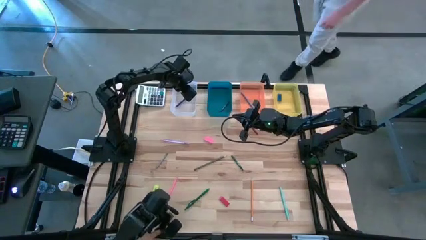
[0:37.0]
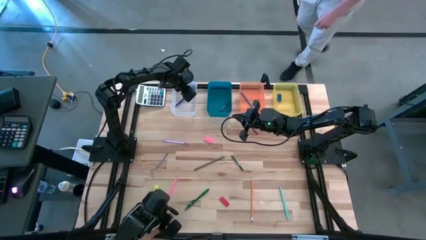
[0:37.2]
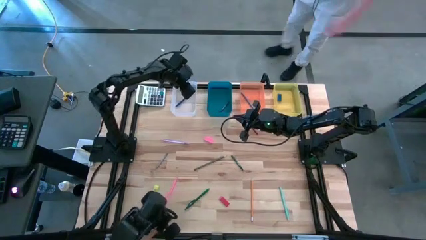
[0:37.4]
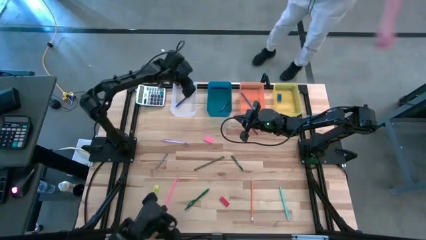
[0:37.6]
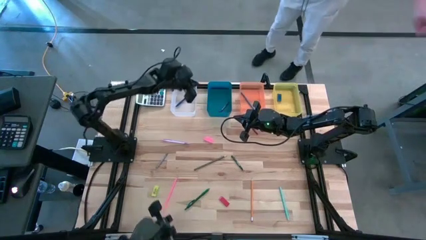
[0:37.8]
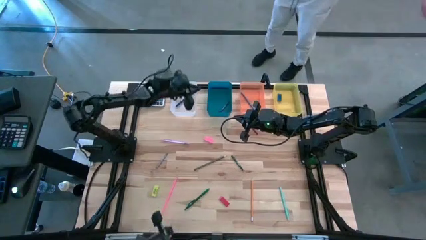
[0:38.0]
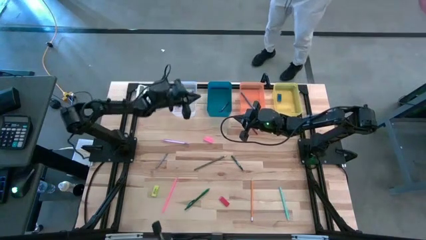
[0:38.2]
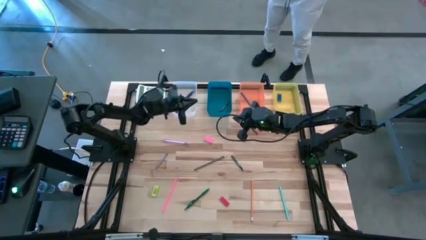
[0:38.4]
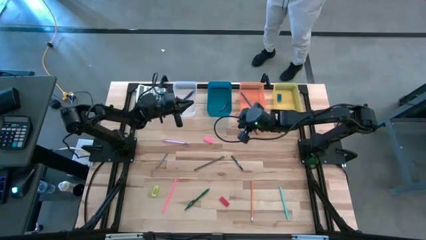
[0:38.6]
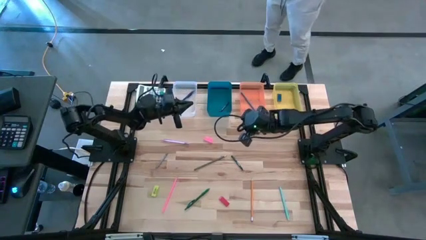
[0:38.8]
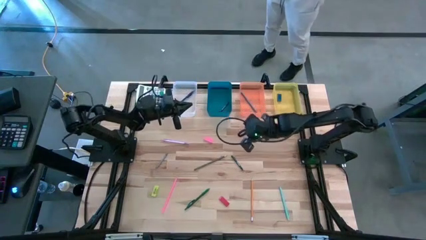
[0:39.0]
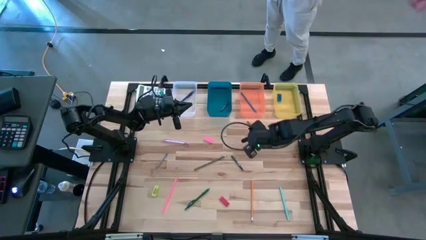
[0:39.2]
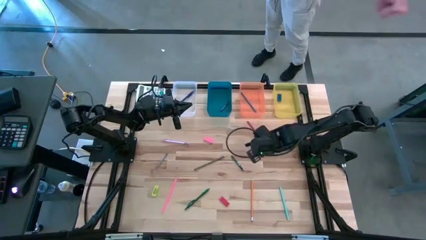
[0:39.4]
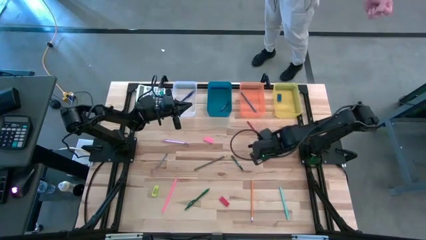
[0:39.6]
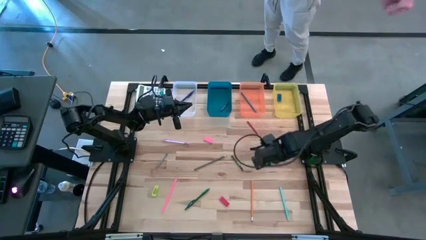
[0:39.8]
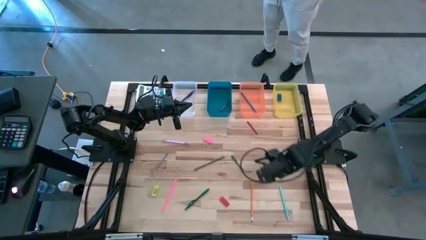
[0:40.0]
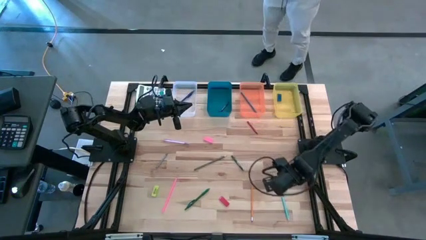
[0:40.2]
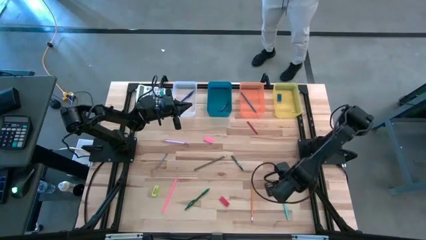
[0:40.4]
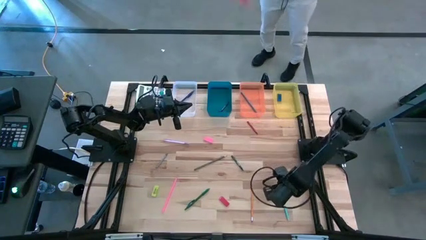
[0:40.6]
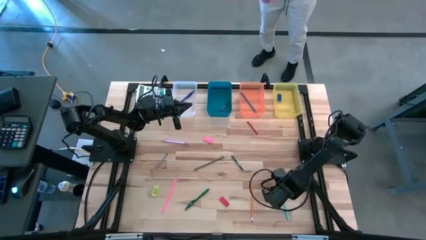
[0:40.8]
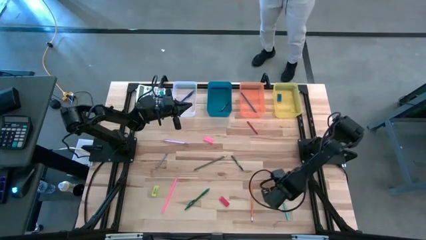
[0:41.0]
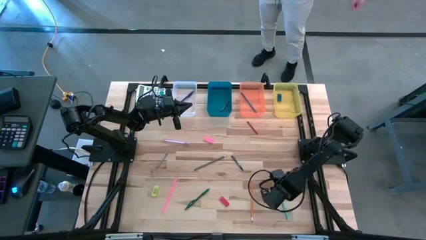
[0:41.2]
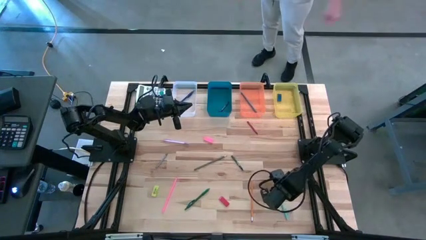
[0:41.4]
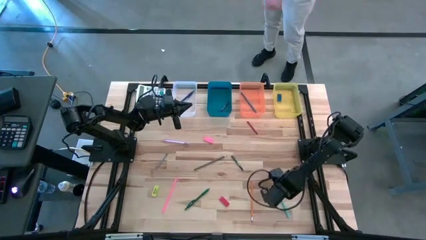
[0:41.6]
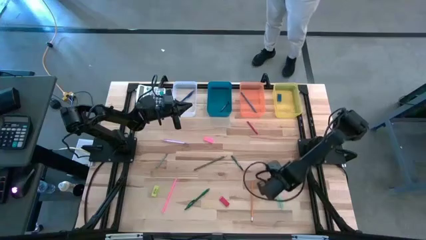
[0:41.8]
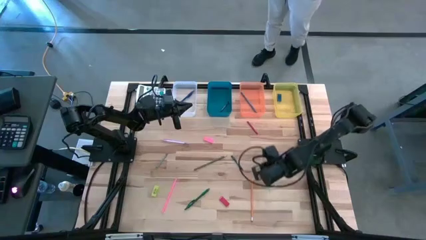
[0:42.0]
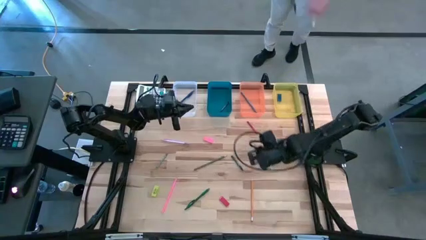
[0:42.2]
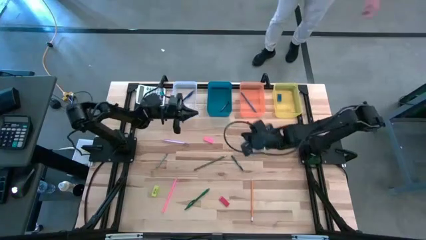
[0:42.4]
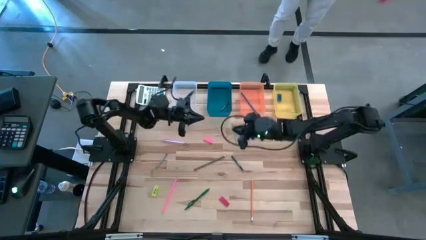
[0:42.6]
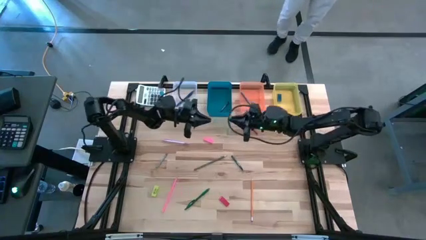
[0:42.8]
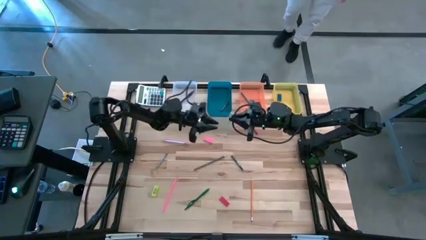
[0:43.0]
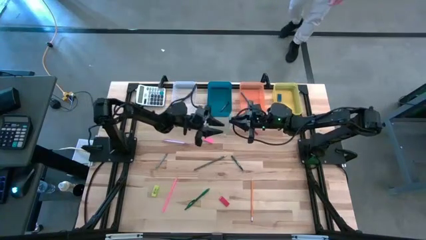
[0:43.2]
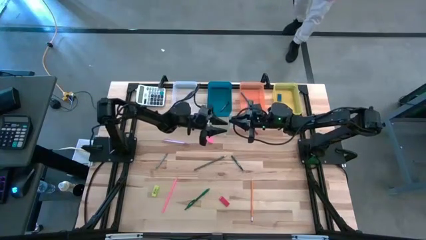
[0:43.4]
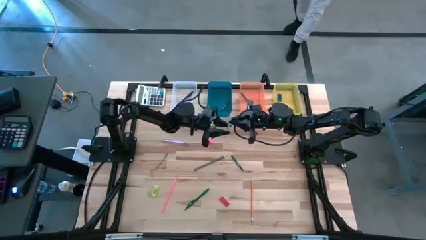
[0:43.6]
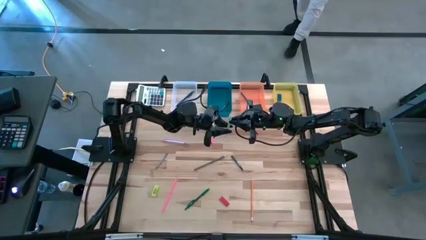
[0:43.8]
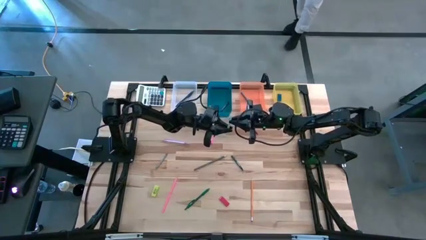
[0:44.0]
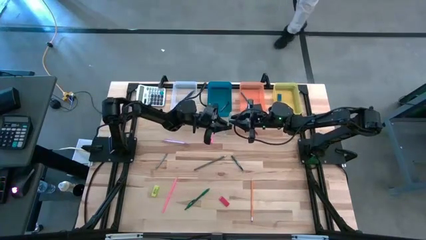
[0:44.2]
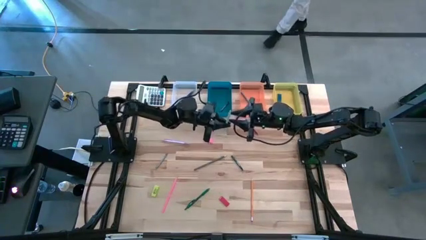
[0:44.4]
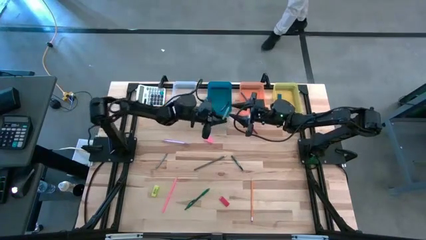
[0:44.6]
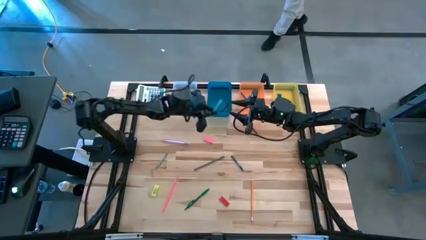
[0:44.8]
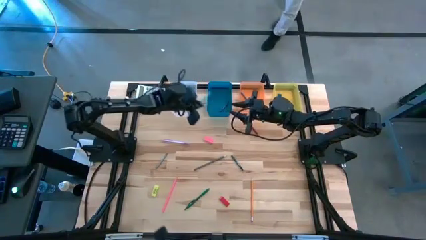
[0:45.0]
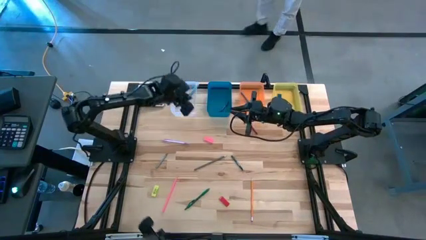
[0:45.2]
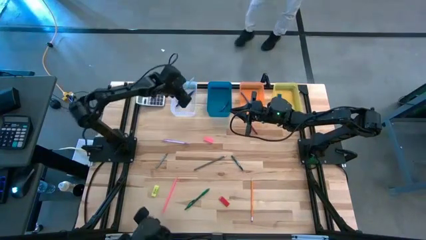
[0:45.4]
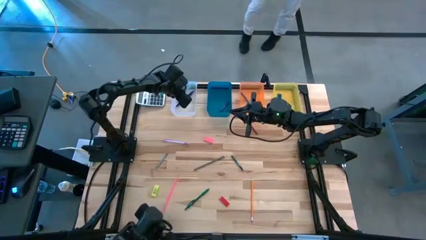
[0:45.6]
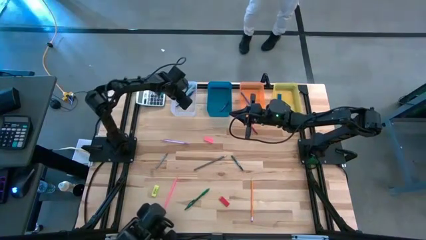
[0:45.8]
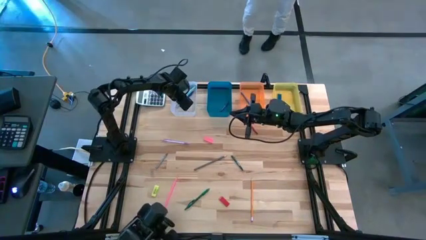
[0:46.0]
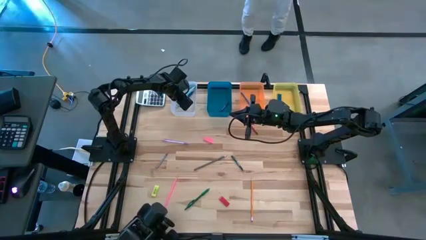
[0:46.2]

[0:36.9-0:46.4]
Task: Sort crayons/erasers/pens/pencils in bins
Put the light blue pen into the transparent bin

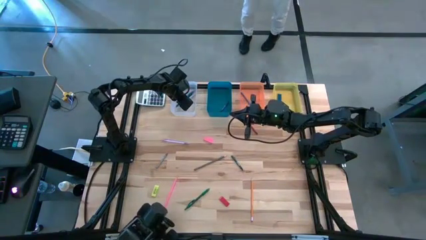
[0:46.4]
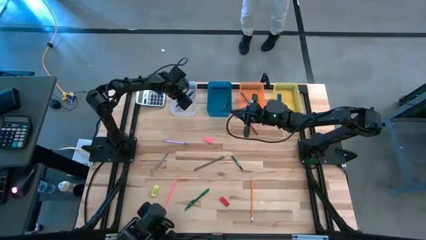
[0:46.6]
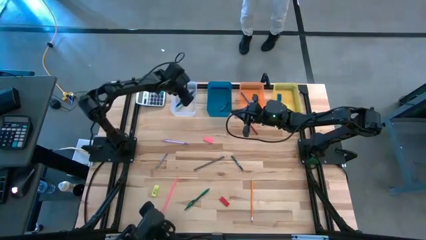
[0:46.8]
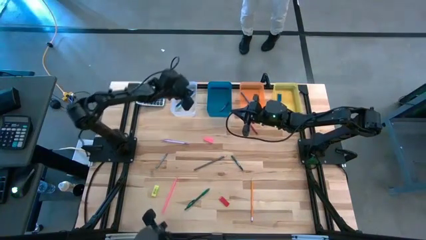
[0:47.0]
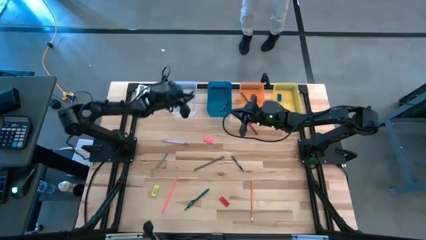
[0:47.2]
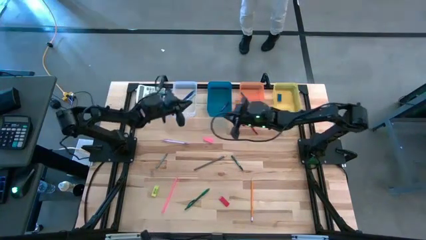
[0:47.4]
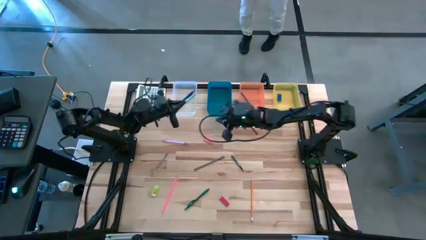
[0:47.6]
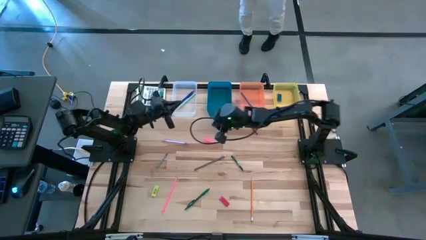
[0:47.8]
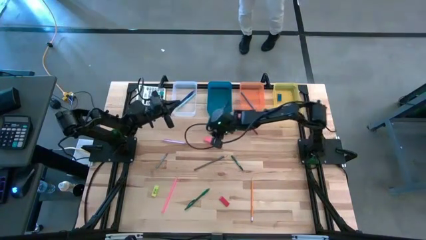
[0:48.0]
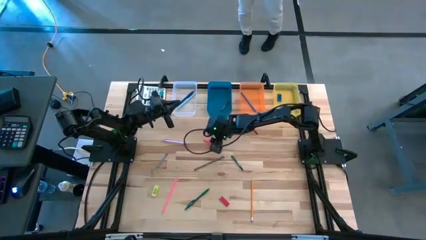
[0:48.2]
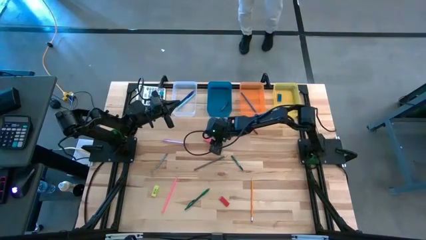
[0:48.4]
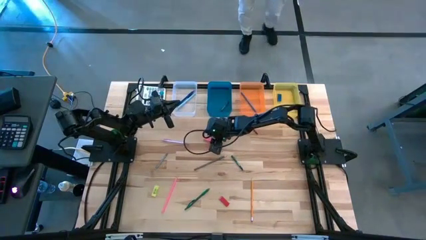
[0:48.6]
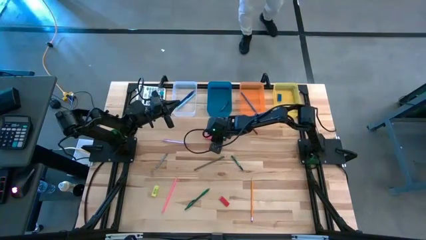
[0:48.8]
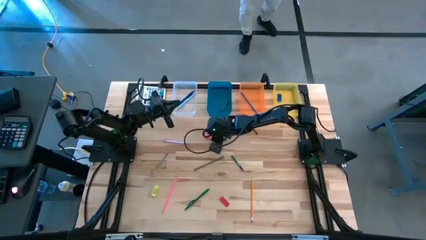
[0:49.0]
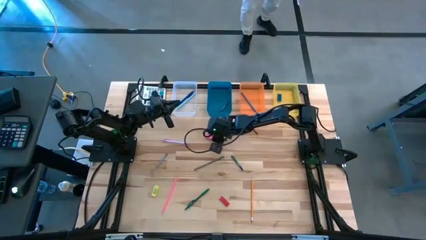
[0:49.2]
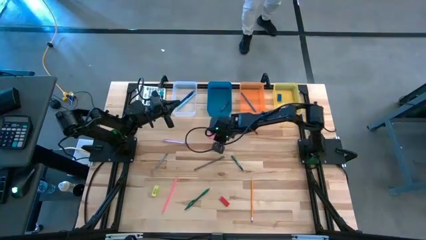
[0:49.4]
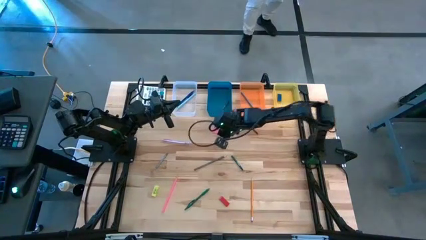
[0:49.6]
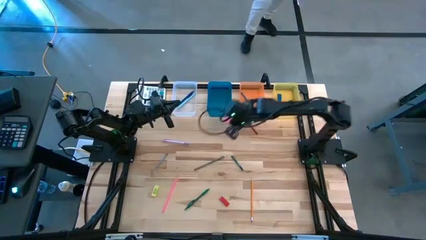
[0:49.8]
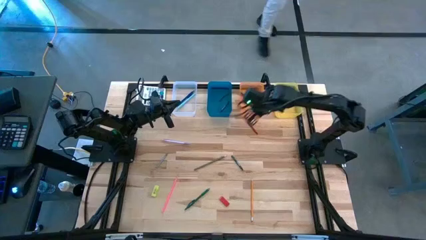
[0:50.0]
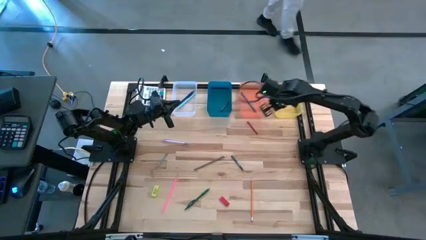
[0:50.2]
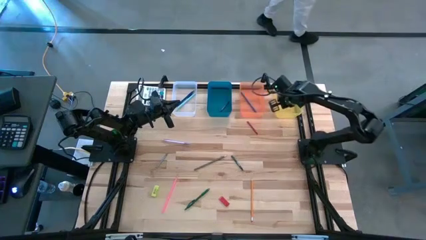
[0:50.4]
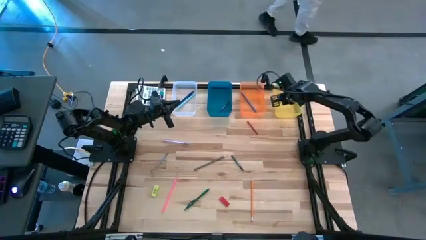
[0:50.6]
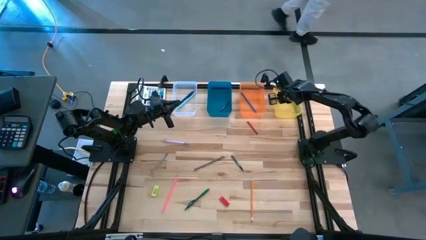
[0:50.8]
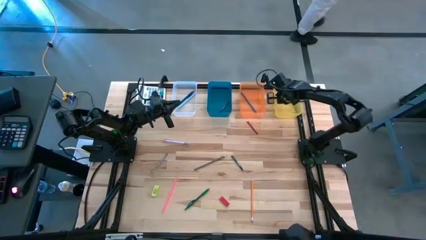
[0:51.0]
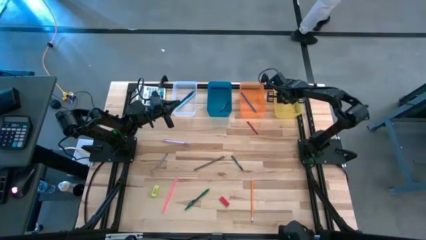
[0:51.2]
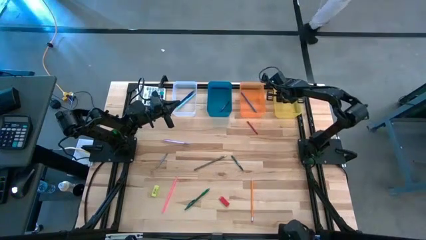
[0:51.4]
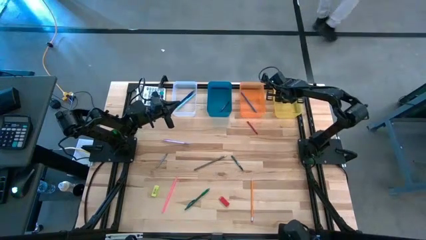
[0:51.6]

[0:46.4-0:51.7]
Put the pink eraser into the yellow bin

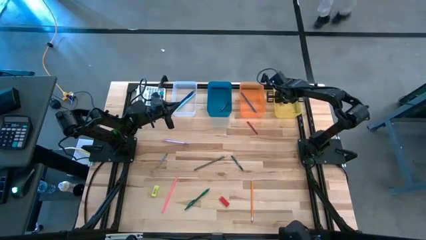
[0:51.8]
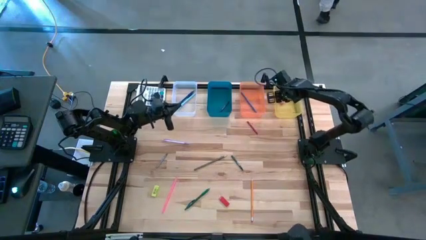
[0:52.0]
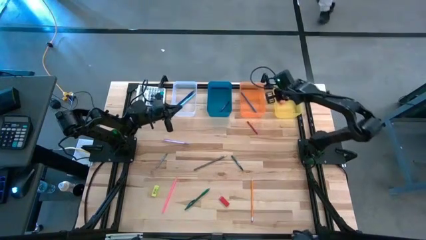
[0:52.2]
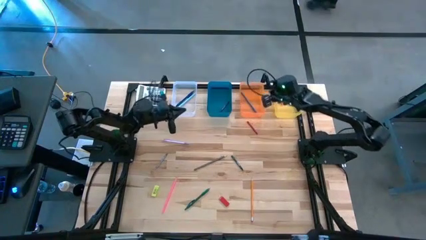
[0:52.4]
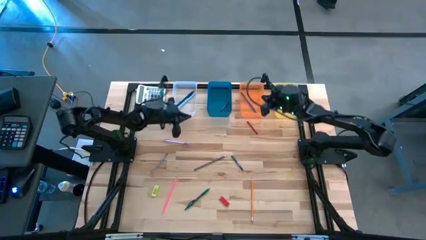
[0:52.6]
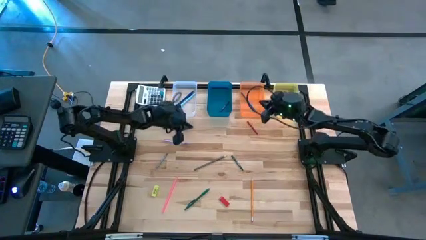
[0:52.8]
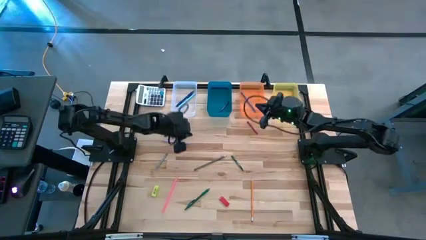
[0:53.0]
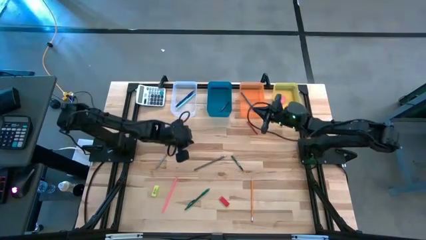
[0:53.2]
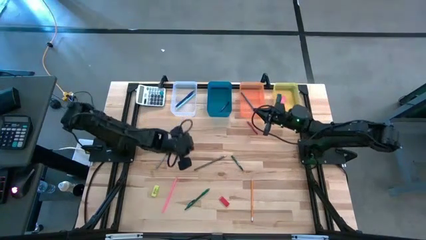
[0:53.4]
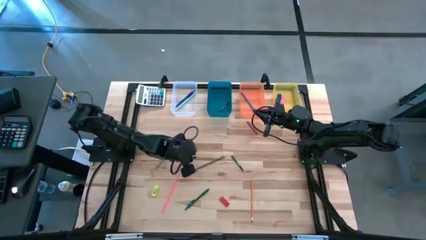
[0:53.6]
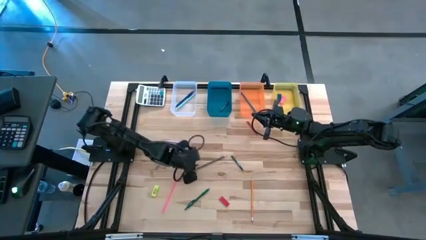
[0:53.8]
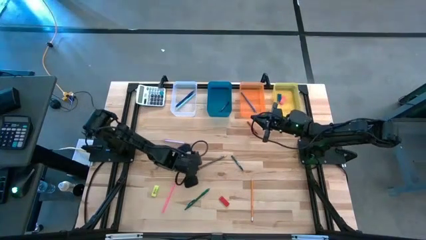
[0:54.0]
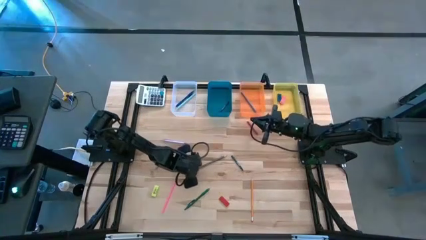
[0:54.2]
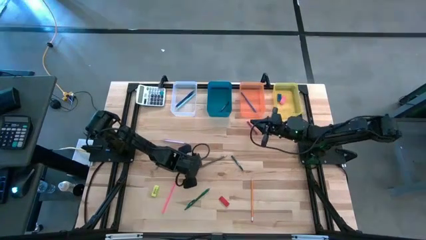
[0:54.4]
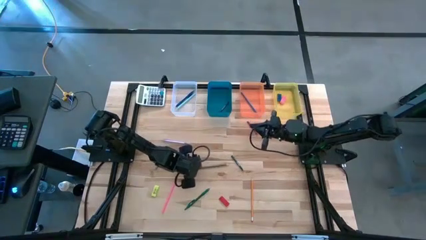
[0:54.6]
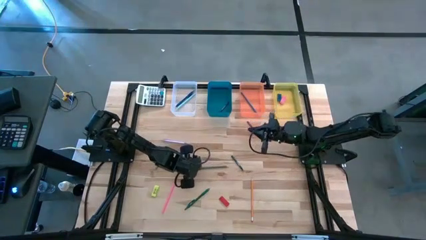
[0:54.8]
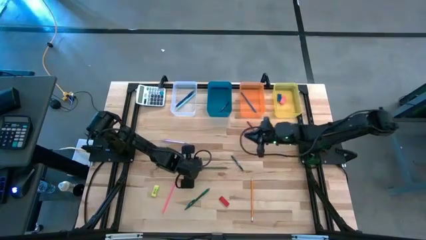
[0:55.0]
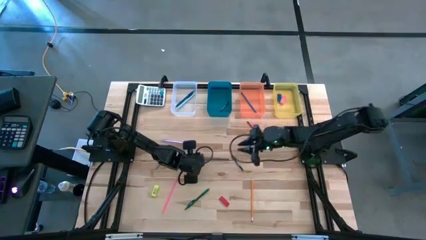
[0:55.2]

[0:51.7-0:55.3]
Put the dark blue pencil into the orange bin
